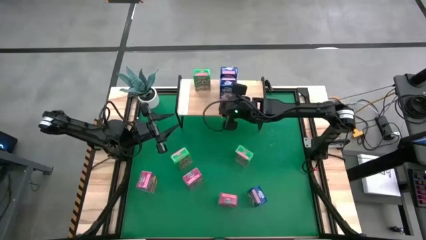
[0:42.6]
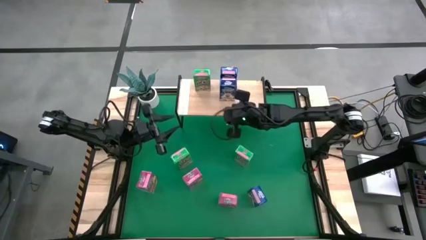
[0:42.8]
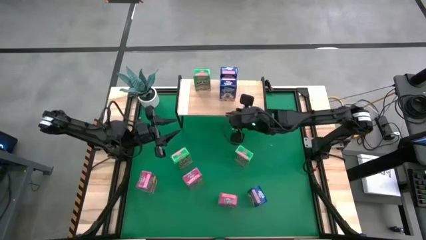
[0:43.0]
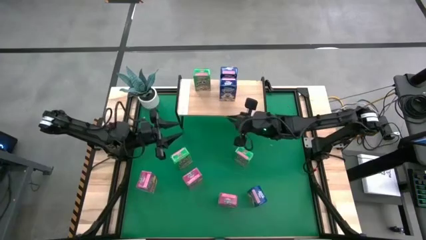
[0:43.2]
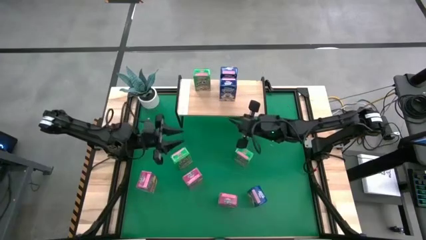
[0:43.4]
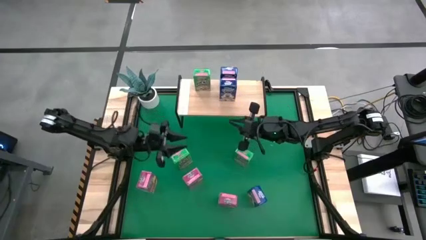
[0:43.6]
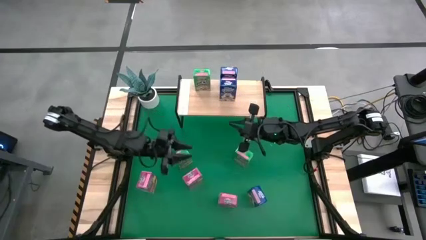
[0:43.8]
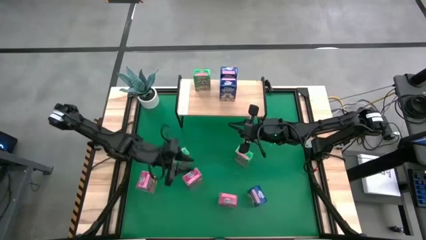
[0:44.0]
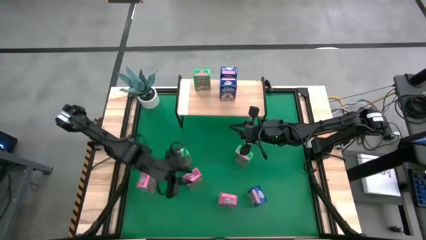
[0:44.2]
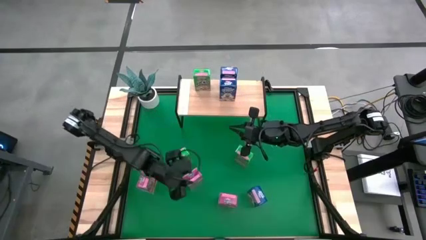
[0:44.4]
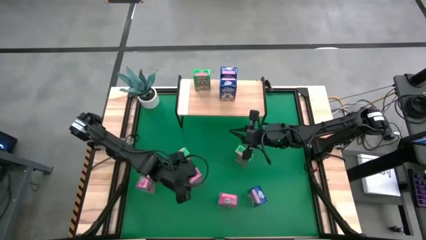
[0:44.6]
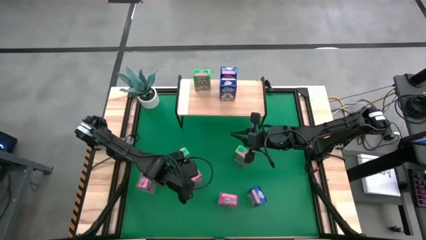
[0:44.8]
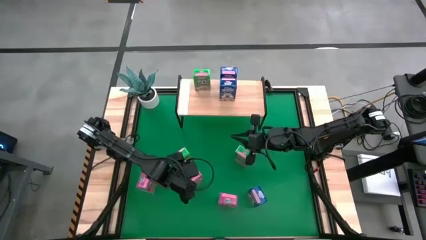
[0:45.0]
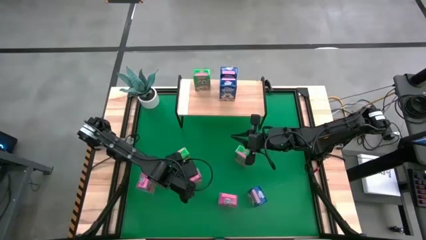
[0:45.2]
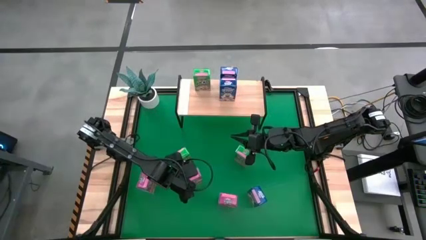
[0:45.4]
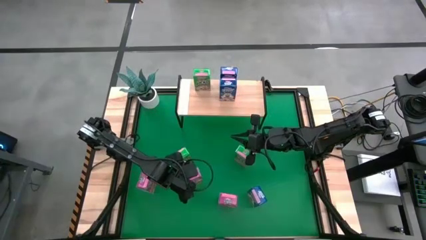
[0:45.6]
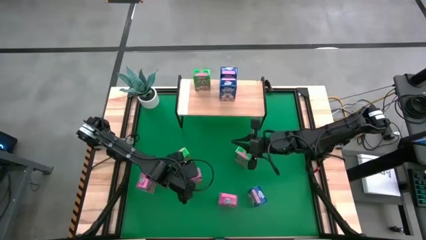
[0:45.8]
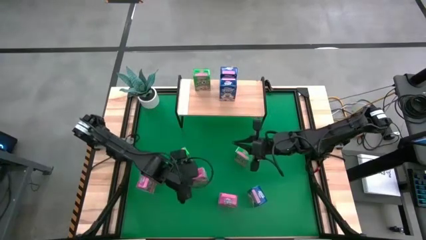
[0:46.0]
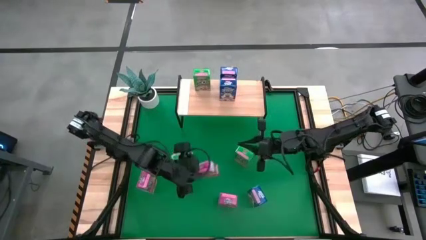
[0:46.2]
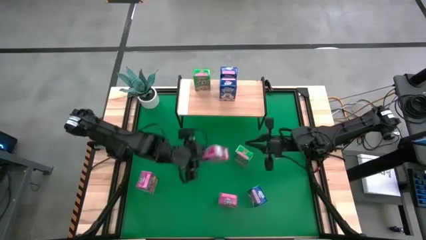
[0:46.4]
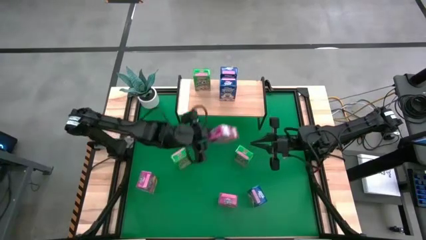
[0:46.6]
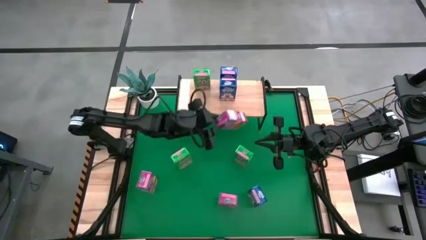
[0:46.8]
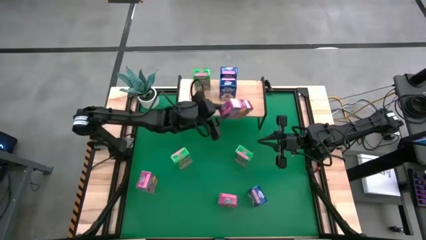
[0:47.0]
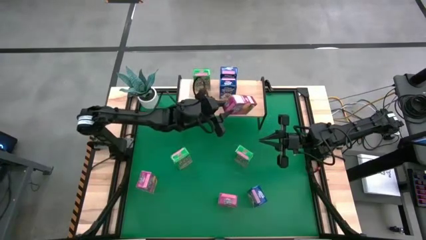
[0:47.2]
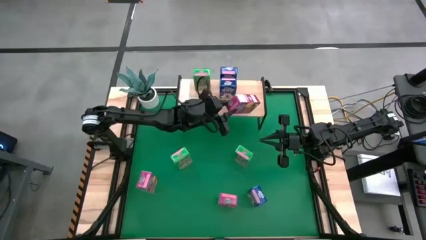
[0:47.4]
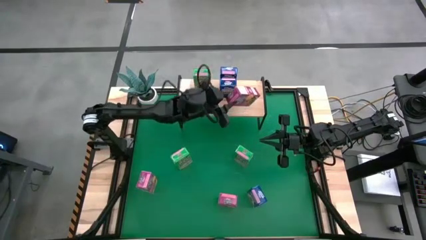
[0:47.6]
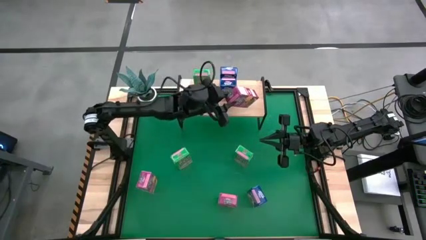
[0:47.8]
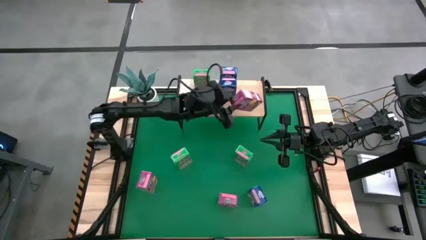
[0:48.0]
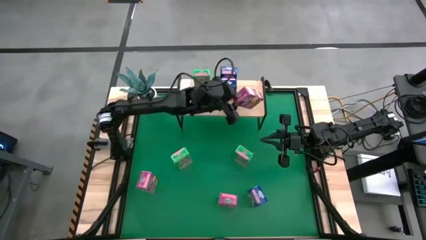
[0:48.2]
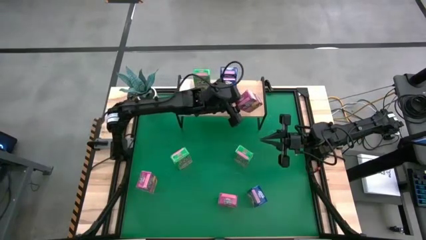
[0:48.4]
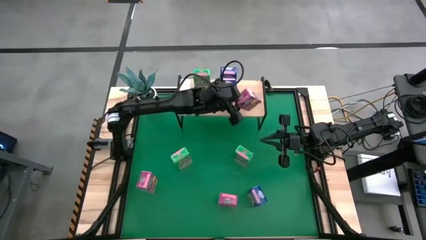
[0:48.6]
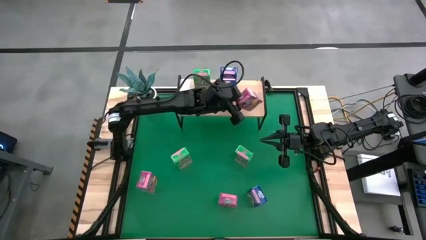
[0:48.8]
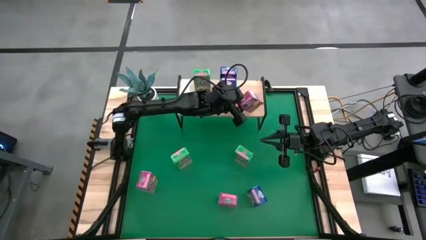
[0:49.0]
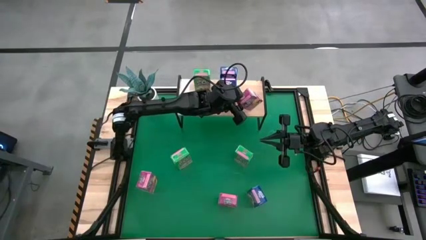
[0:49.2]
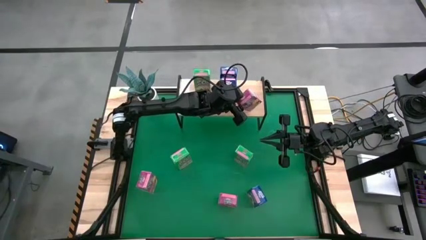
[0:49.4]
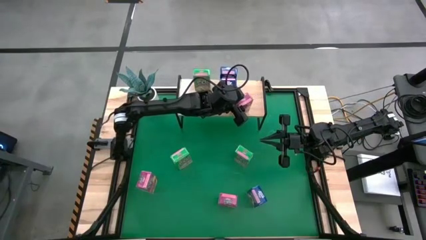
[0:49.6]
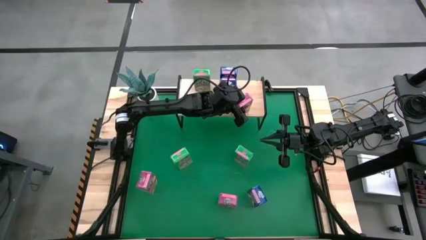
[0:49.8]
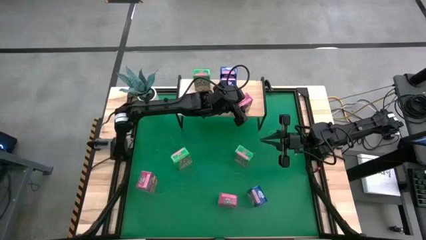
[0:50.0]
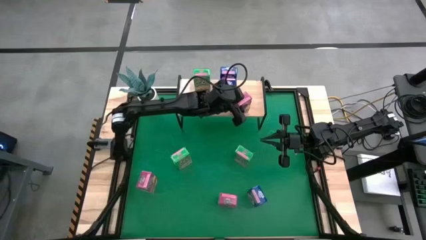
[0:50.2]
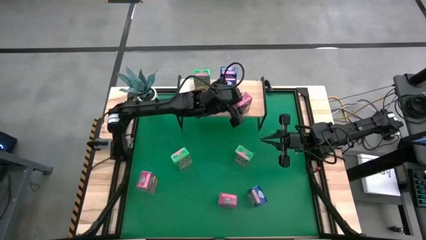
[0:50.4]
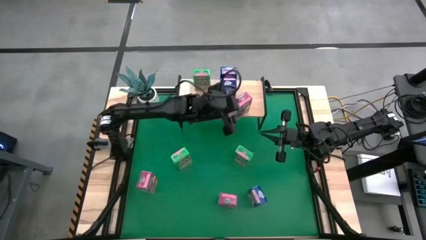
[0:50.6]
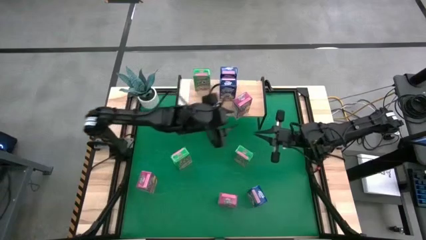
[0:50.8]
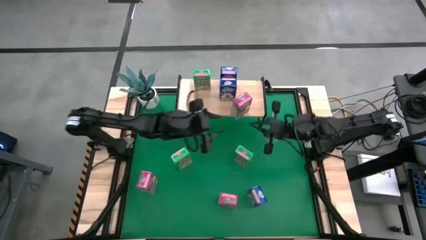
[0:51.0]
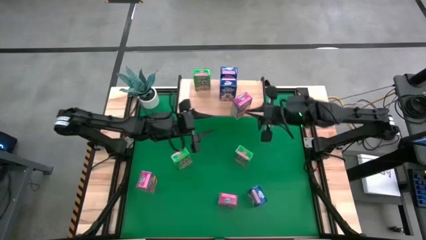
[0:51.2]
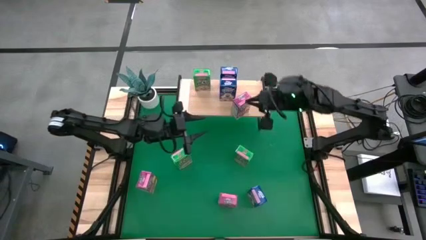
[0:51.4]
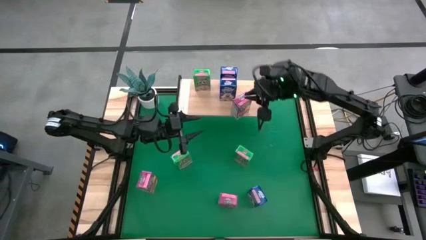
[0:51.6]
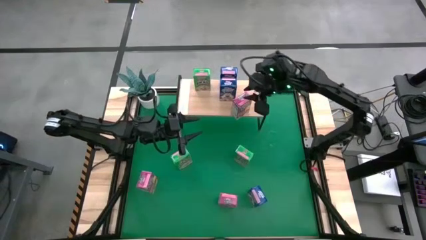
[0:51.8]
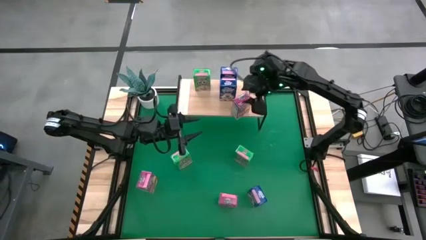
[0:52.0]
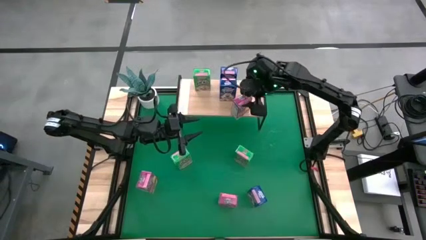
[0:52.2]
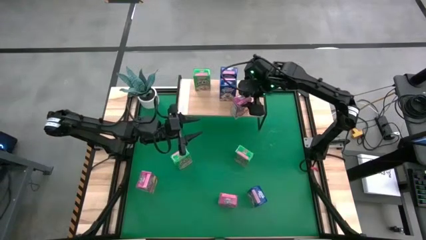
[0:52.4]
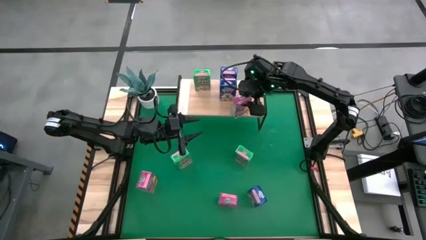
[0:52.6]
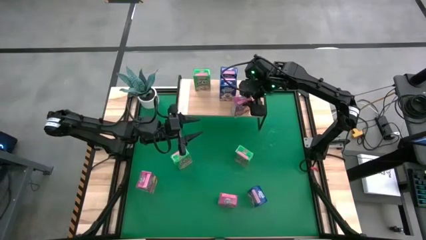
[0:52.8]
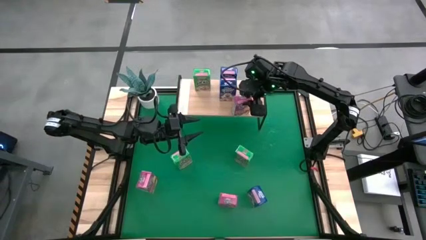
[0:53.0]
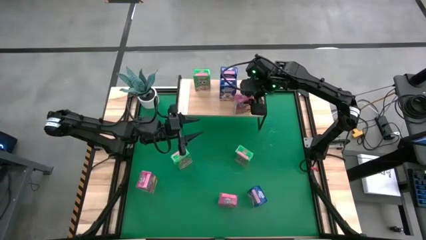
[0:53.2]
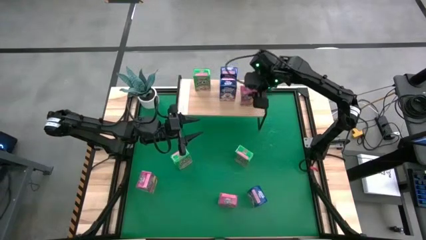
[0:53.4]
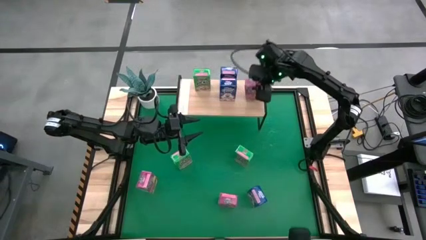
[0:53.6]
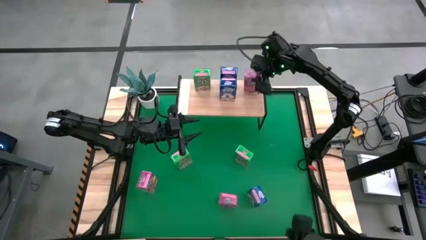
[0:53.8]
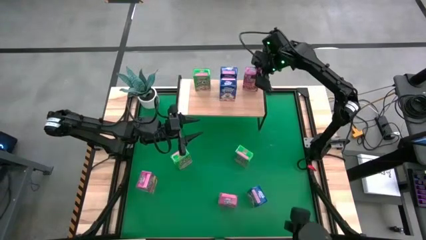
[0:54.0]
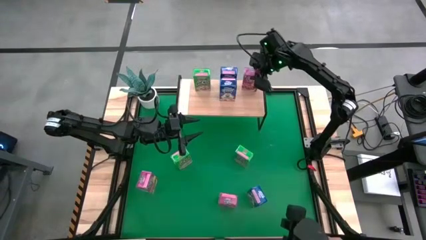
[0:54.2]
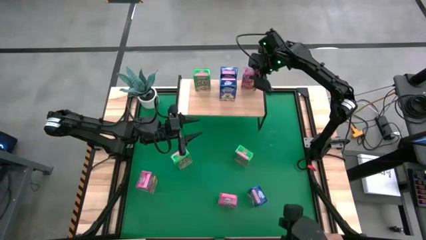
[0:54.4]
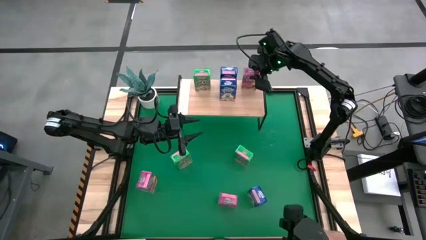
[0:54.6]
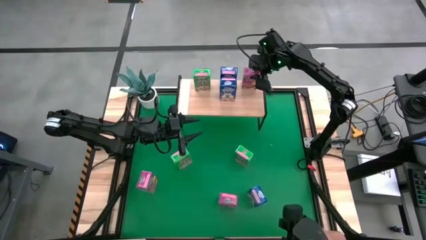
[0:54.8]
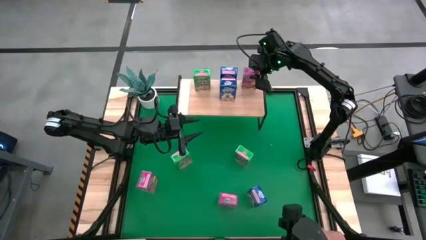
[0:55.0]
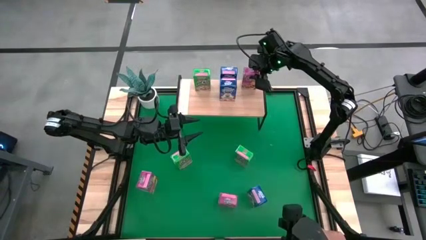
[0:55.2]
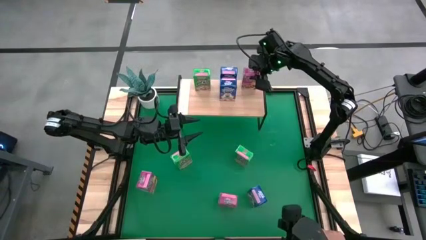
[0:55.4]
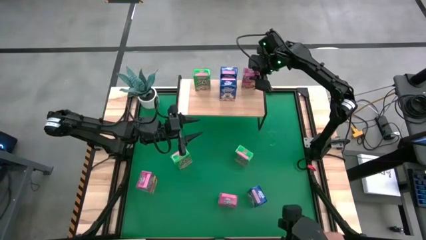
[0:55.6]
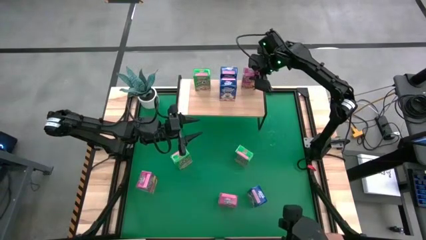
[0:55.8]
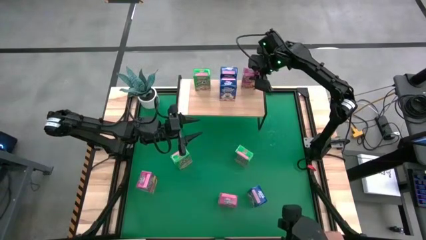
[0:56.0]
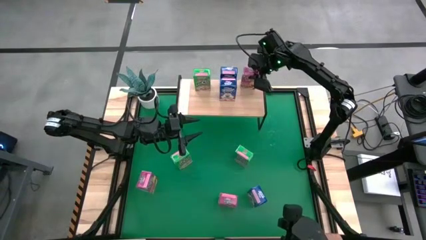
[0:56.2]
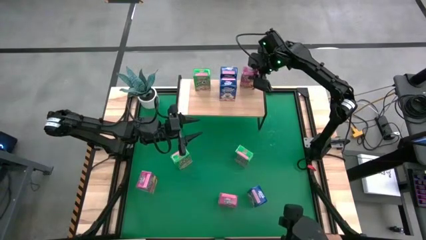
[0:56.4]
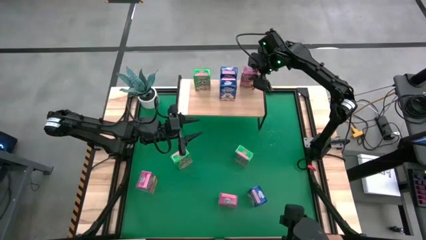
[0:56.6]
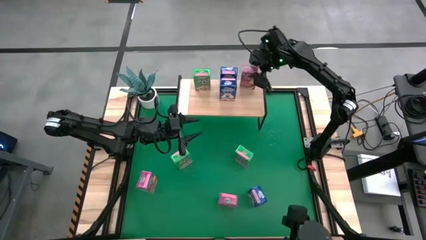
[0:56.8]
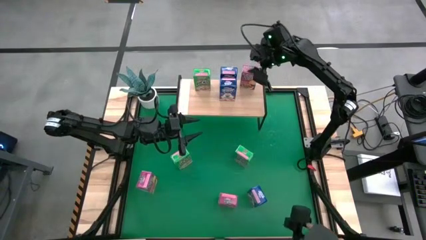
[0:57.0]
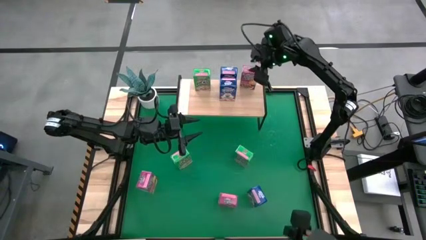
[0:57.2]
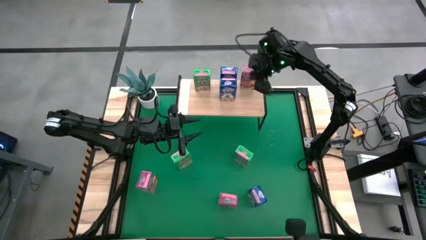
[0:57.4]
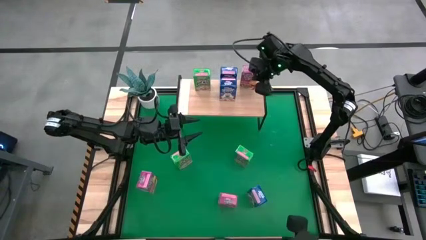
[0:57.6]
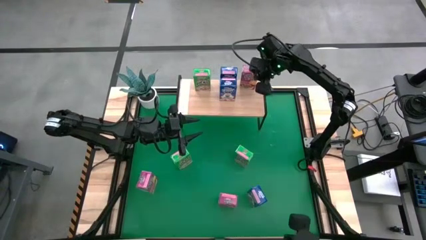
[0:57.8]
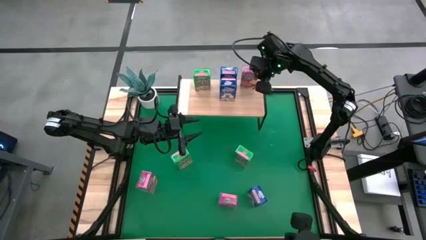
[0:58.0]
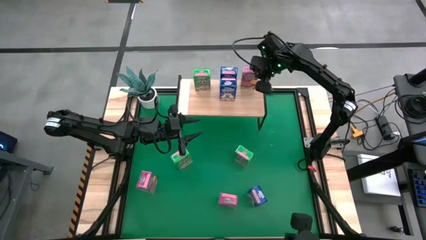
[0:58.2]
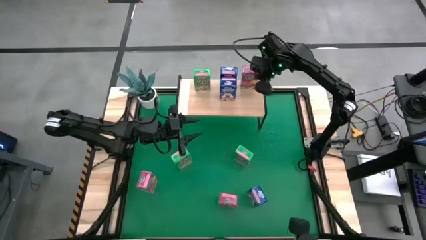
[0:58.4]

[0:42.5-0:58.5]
Task: Stack cereal on shelf
Put the middle pink cereal box on the shelf
